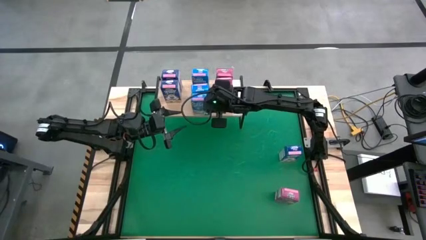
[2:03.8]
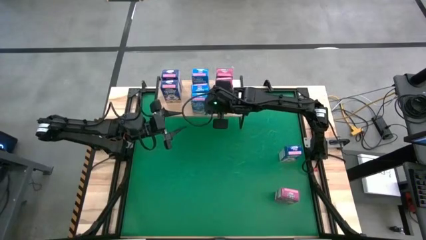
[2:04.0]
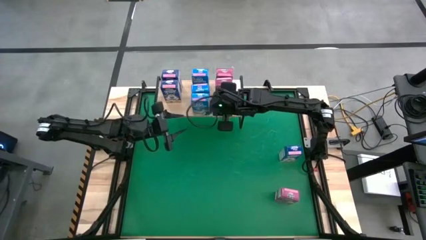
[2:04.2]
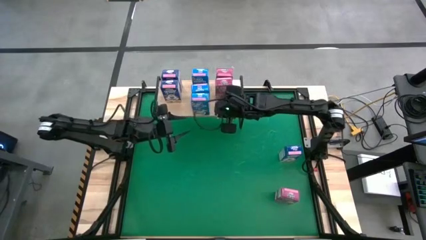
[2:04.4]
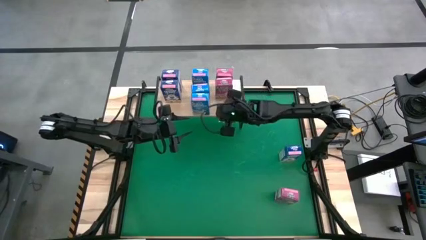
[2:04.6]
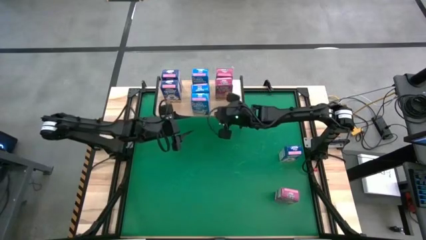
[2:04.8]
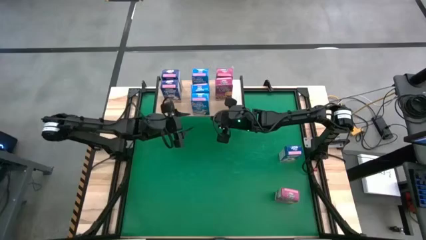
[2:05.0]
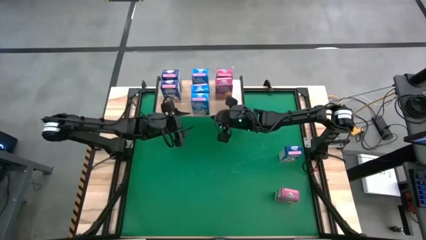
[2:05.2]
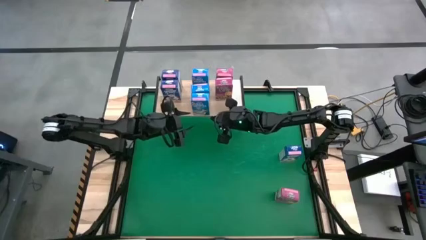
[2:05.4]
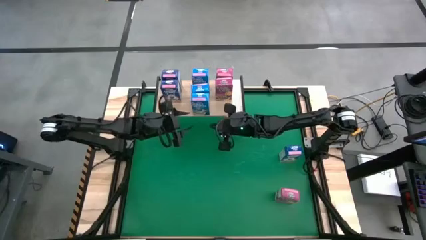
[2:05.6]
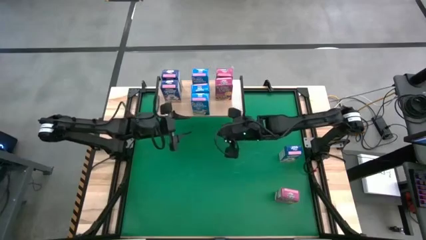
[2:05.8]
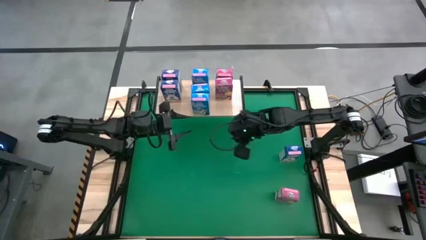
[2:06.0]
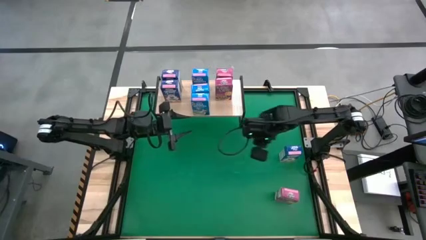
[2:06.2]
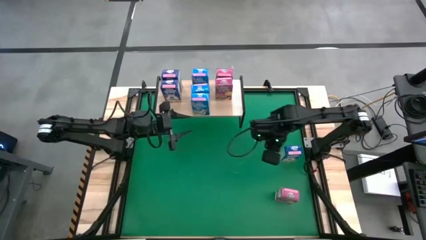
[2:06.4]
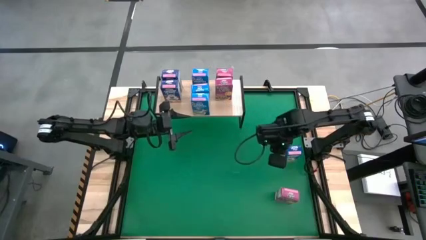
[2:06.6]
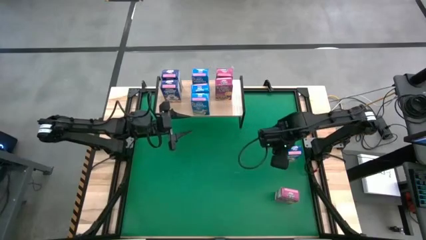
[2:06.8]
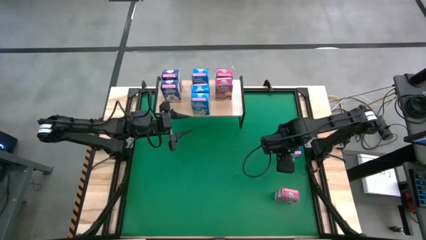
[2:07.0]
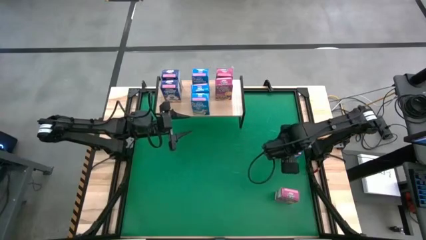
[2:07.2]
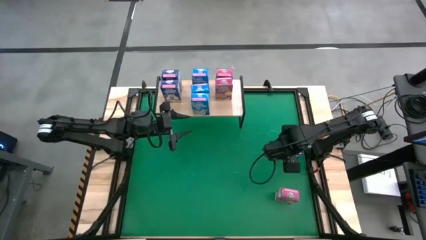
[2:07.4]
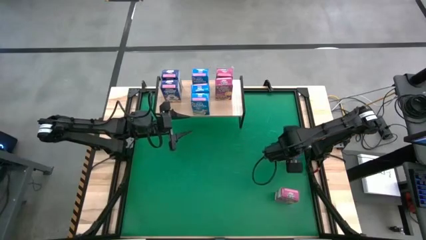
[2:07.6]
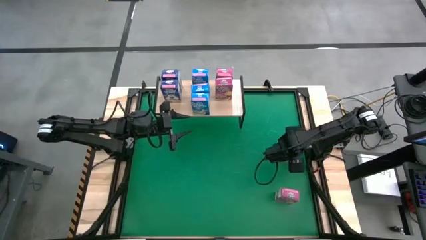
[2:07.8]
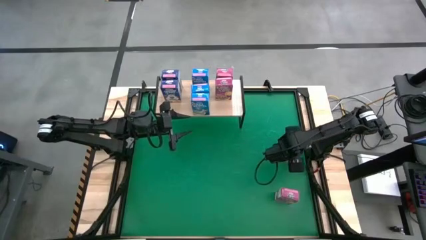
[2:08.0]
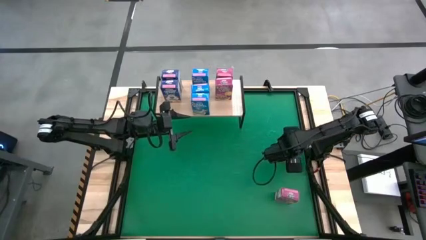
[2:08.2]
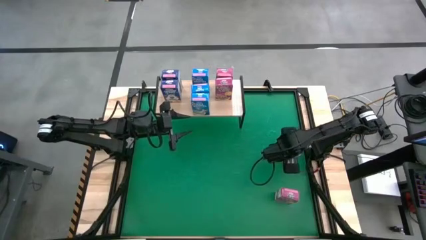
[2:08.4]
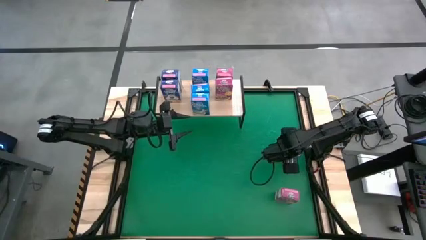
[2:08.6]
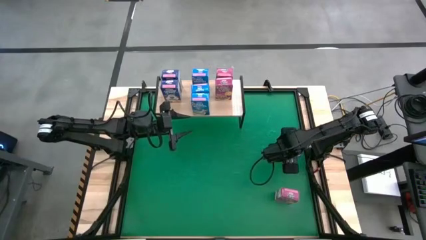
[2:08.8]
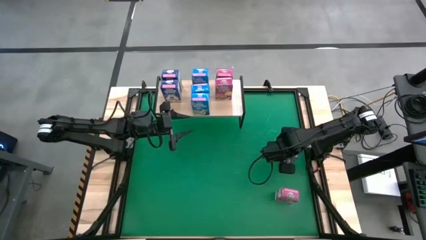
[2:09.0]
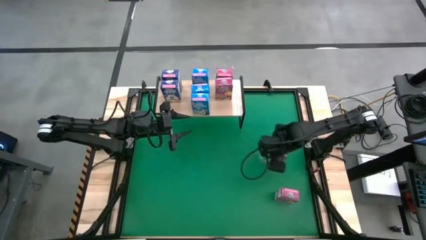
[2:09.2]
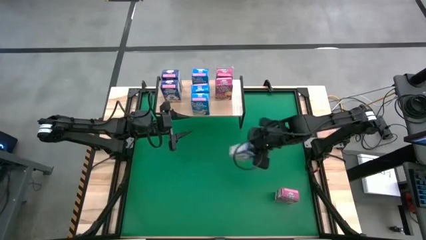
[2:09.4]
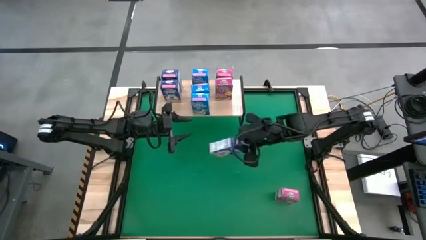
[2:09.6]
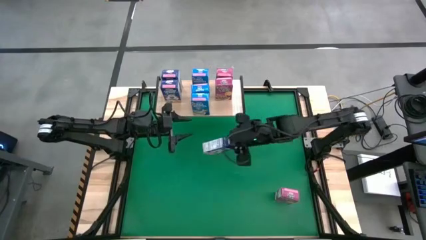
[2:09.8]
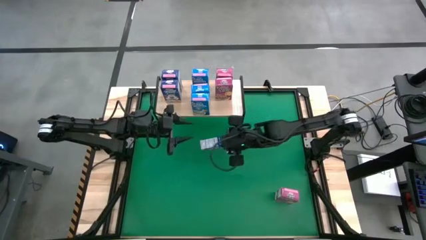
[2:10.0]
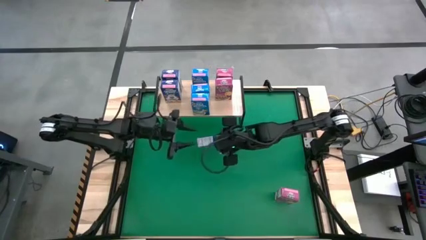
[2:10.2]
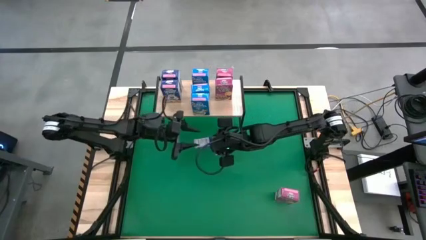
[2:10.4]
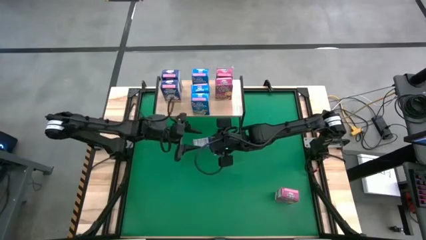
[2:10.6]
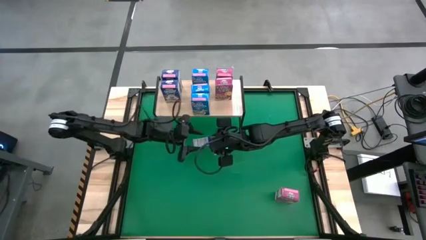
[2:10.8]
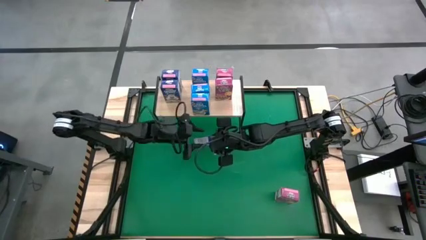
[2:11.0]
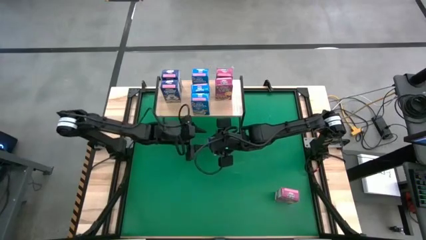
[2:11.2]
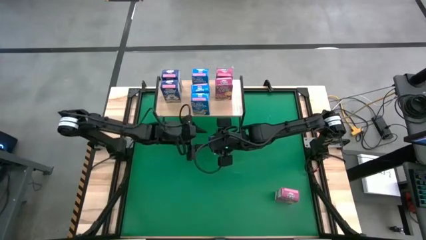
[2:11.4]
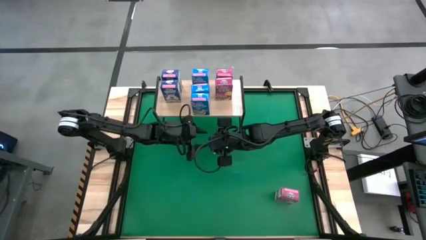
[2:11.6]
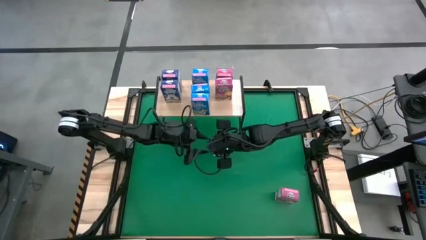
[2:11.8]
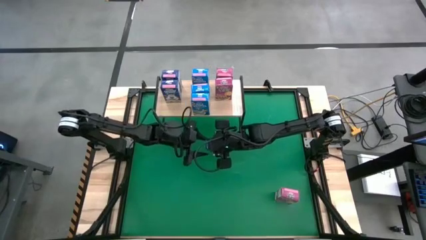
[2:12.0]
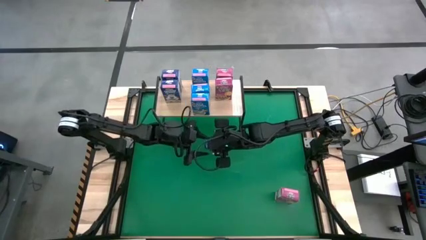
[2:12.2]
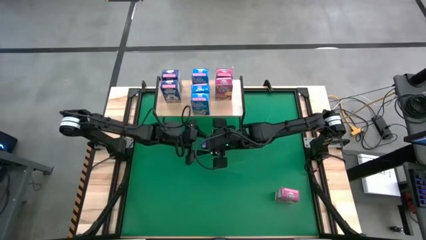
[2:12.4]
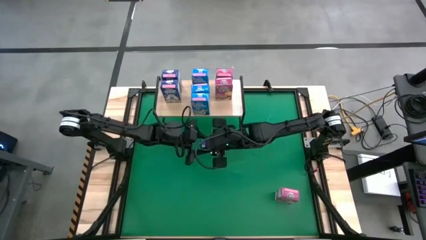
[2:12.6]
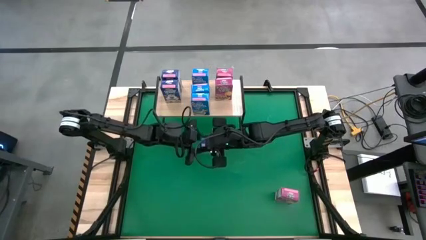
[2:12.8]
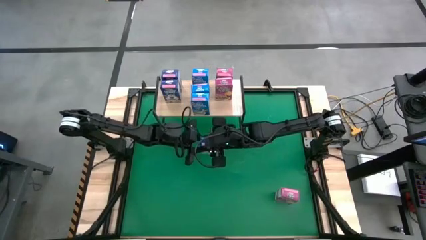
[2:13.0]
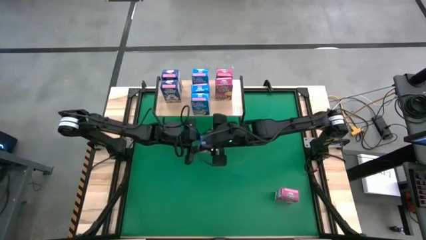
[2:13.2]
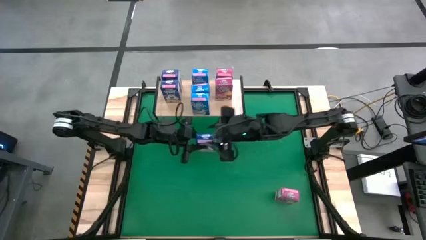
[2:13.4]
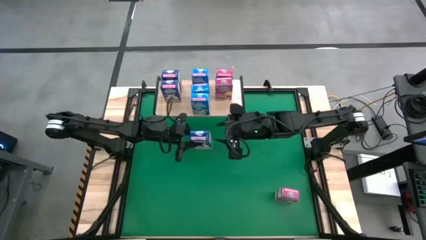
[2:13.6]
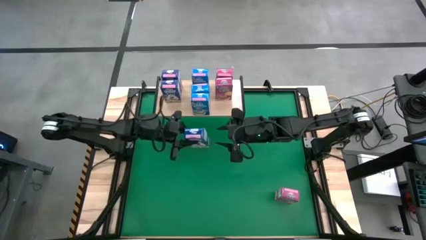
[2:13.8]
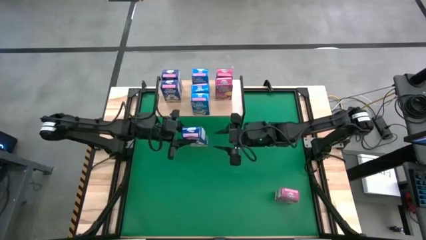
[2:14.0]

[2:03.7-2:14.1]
Task: Stack cereal on shelf
Put the blue cereal box on the shelf aligned with the other blue boxes

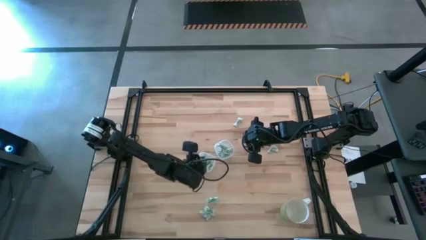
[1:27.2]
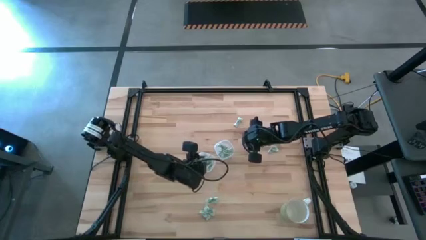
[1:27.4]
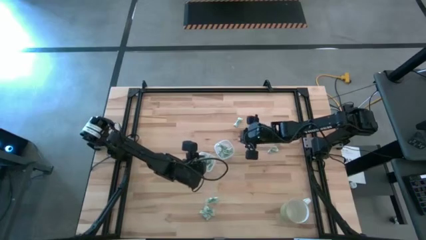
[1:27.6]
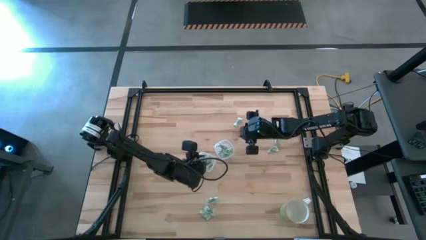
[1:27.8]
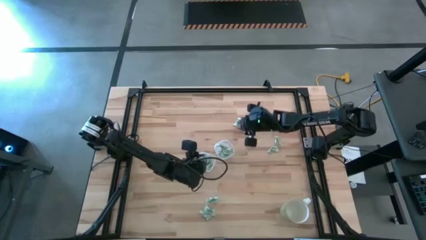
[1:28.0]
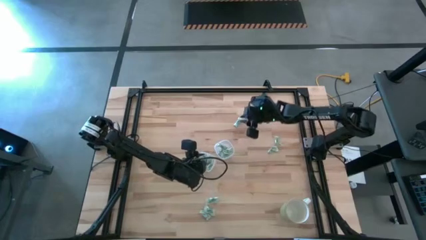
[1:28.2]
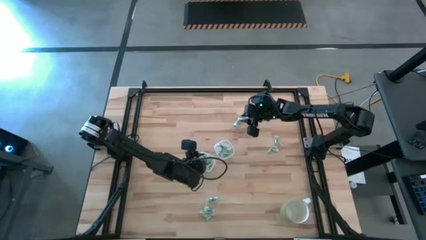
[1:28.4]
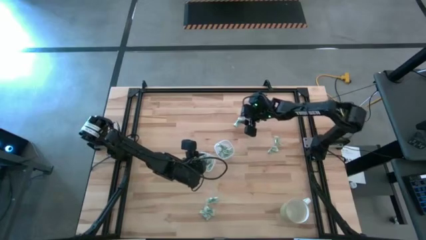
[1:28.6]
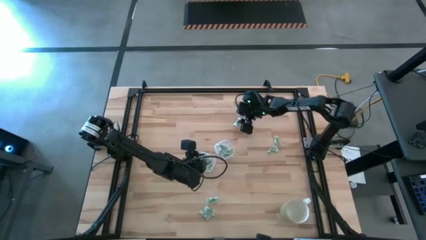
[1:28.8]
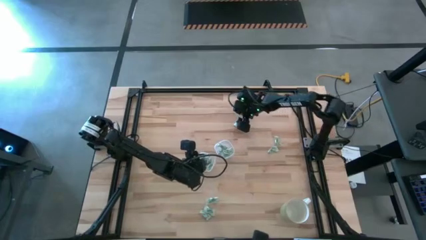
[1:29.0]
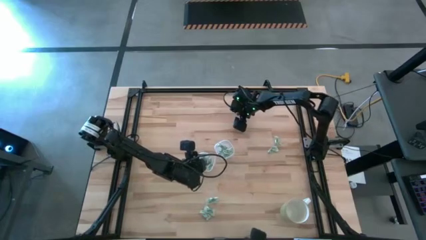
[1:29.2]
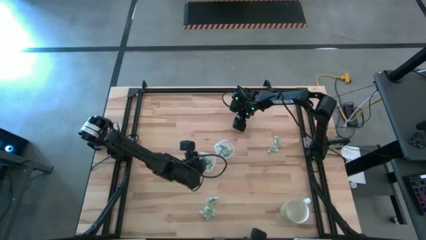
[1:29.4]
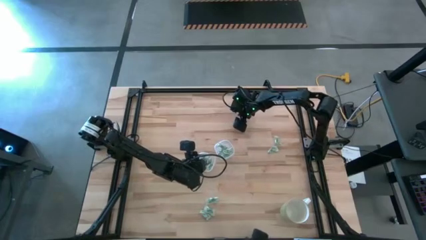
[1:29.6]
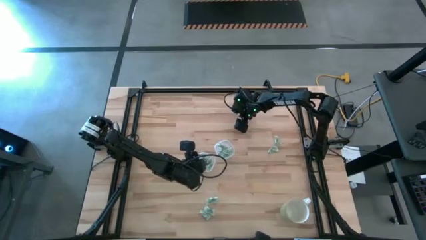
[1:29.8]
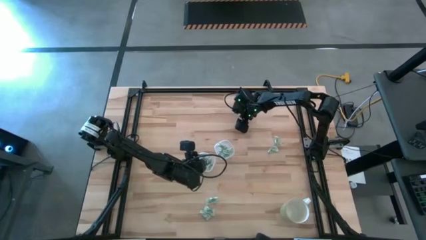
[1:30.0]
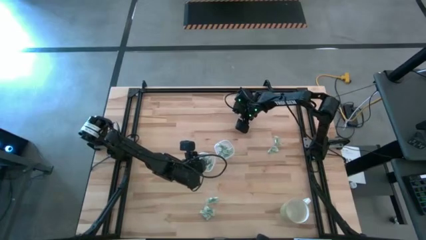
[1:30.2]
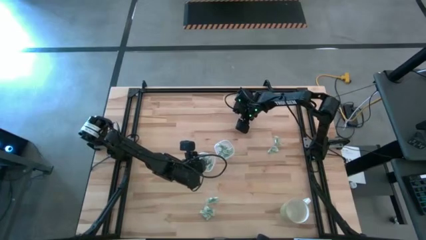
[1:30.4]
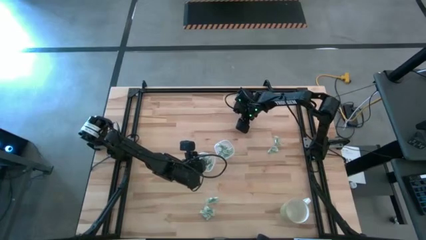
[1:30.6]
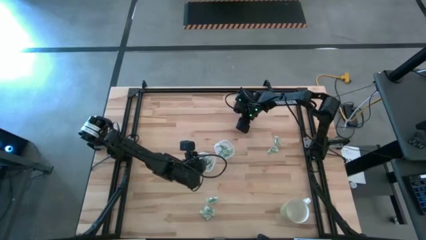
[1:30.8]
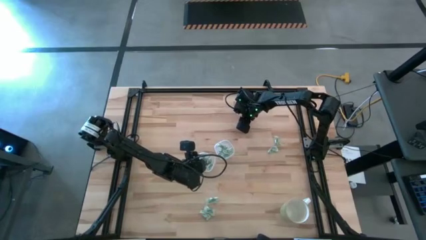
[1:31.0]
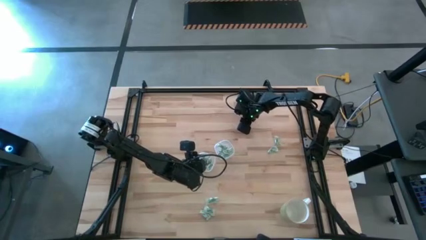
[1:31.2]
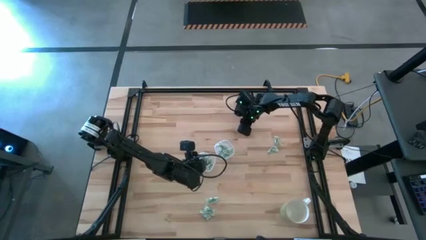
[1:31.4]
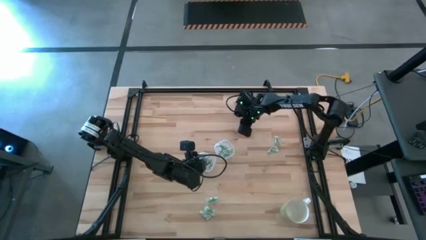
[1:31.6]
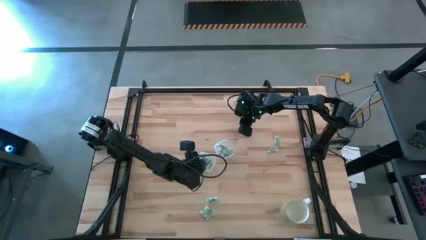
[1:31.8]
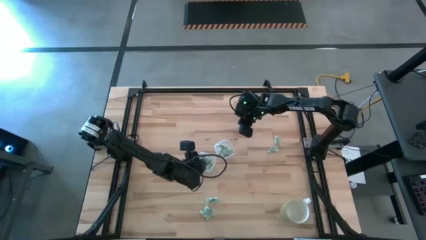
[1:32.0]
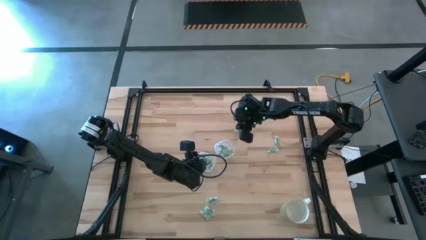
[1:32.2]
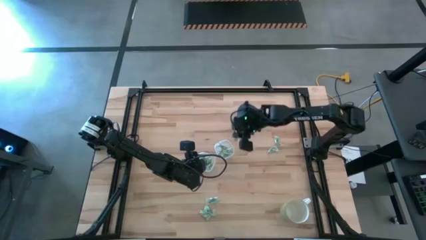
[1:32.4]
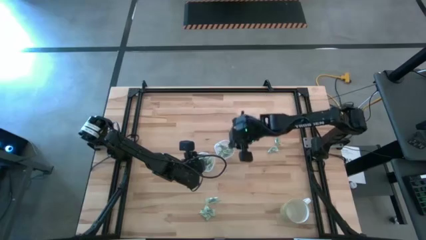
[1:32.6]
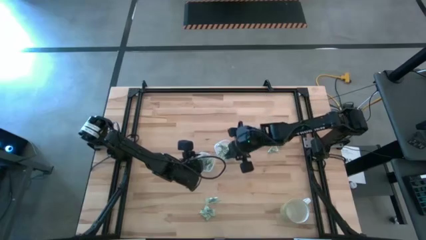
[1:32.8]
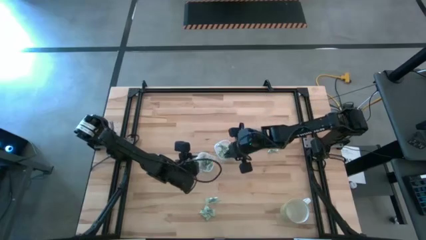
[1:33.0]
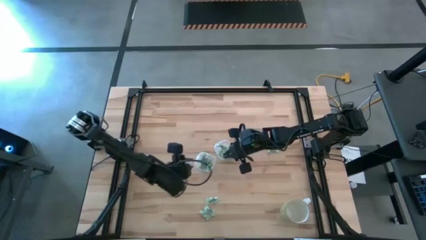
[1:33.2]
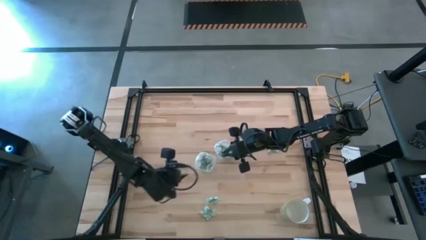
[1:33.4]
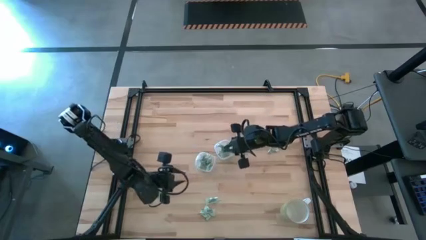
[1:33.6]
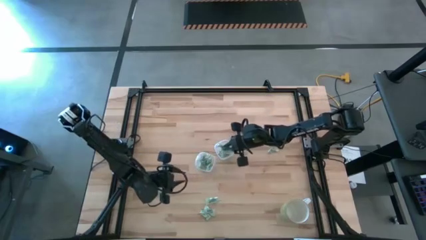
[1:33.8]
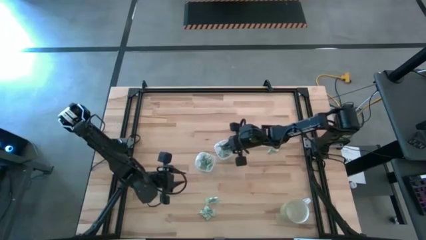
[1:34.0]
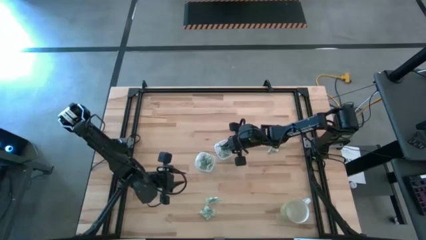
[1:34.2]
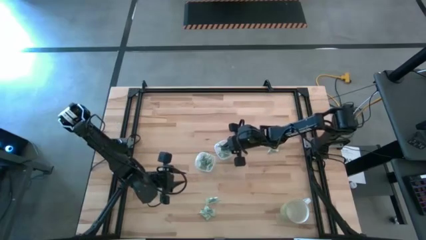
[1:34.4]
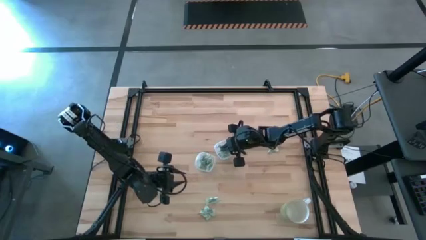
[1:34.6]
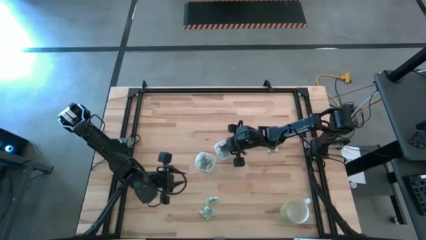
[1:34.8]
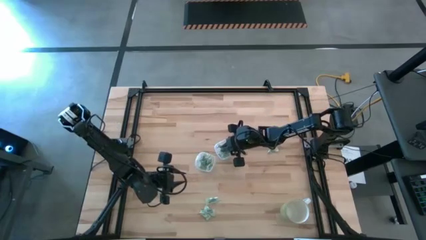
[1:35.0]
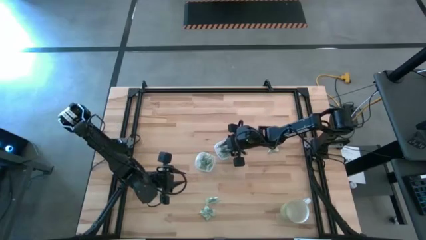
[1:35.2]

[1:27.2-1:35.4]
Task: Pick and place items into bin
Put the stevia packet into the right bin
